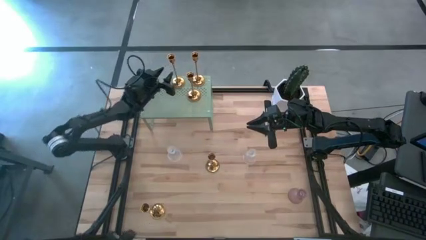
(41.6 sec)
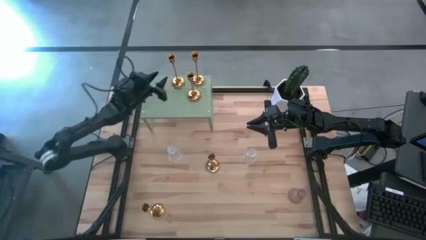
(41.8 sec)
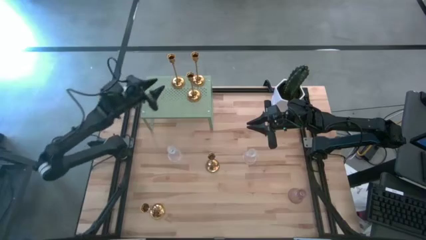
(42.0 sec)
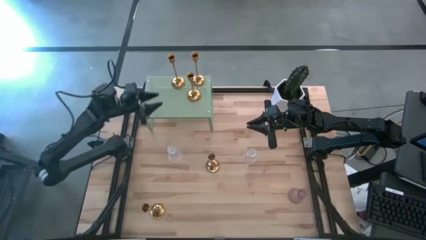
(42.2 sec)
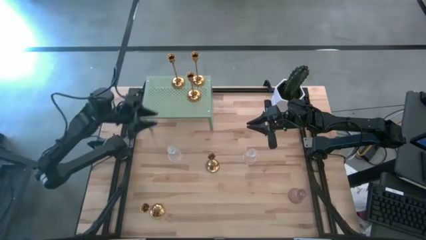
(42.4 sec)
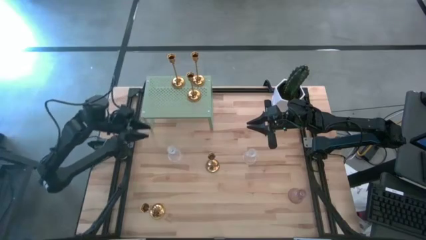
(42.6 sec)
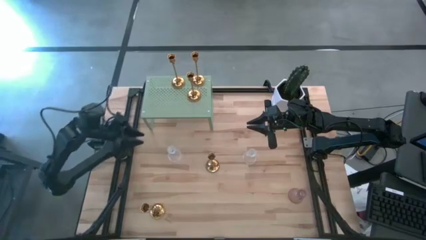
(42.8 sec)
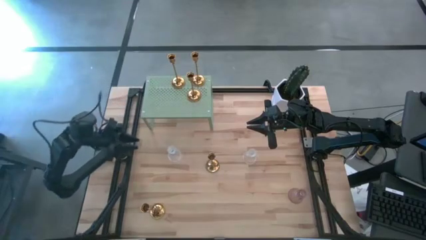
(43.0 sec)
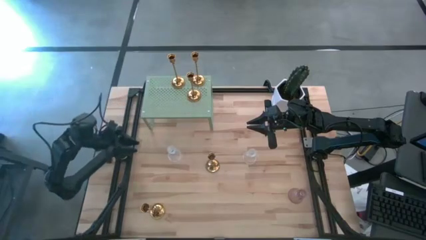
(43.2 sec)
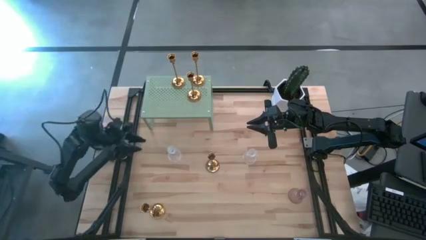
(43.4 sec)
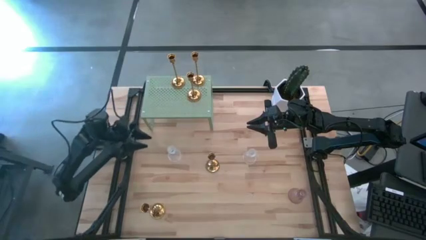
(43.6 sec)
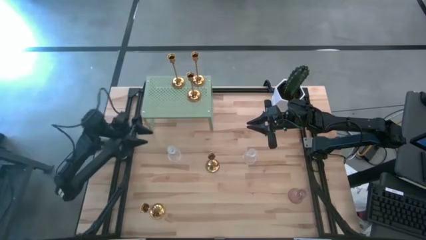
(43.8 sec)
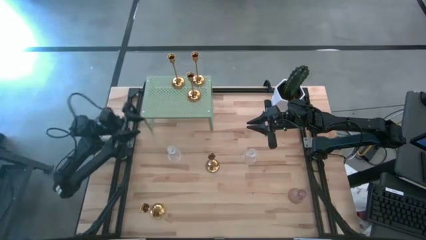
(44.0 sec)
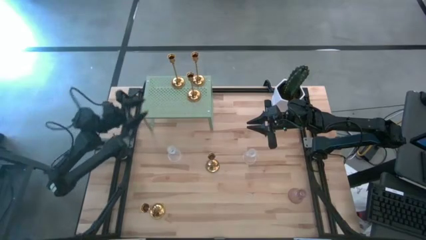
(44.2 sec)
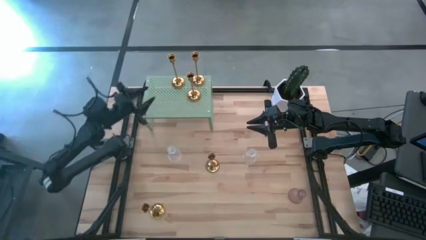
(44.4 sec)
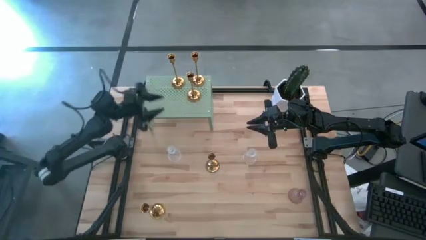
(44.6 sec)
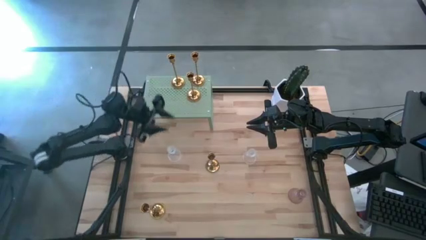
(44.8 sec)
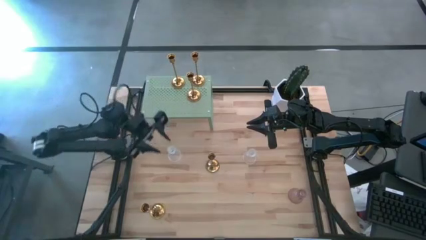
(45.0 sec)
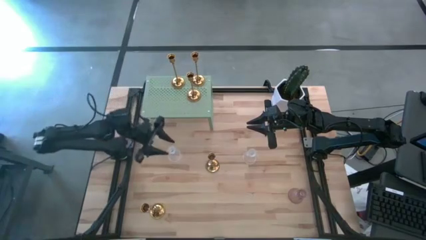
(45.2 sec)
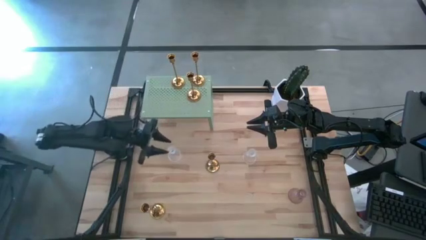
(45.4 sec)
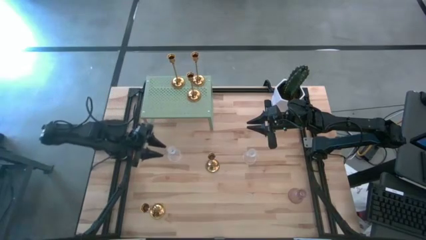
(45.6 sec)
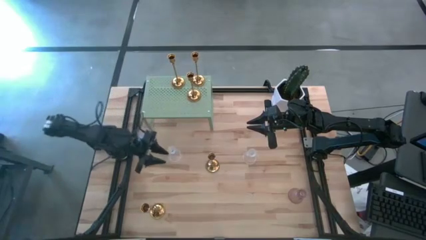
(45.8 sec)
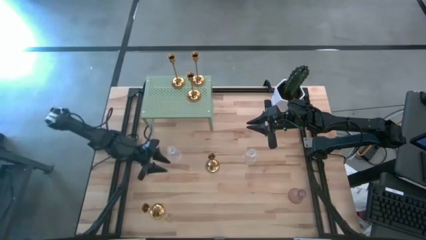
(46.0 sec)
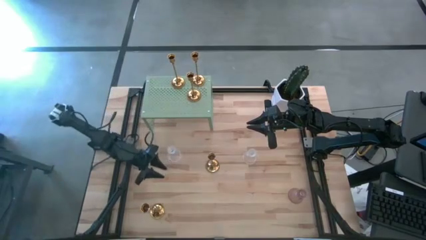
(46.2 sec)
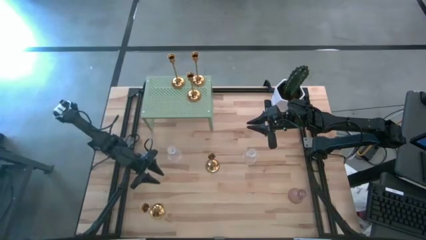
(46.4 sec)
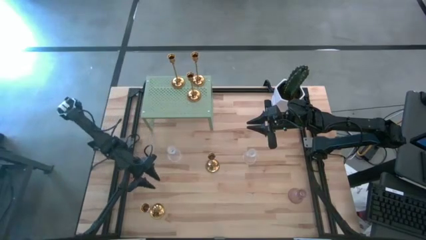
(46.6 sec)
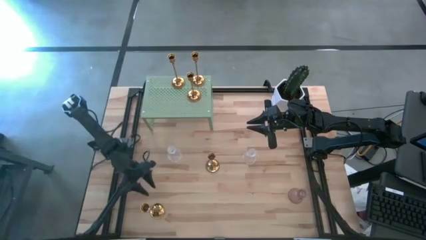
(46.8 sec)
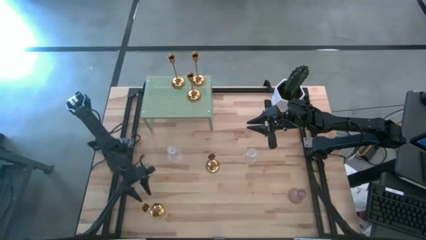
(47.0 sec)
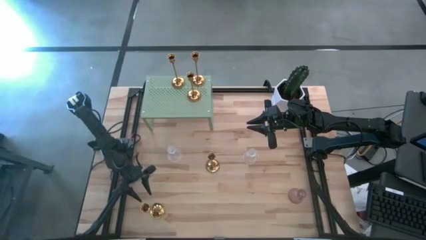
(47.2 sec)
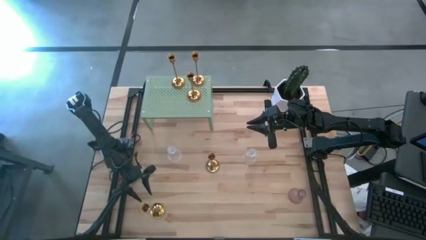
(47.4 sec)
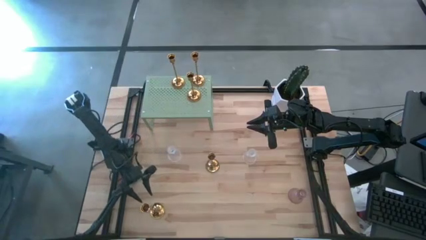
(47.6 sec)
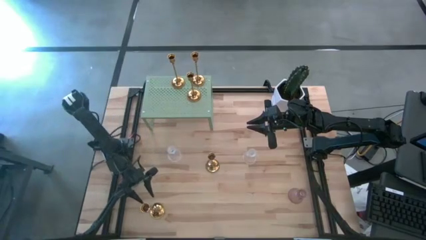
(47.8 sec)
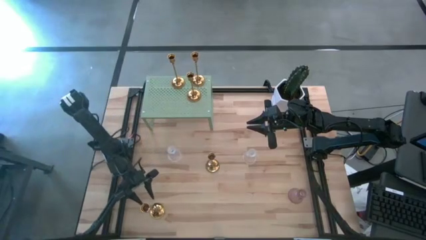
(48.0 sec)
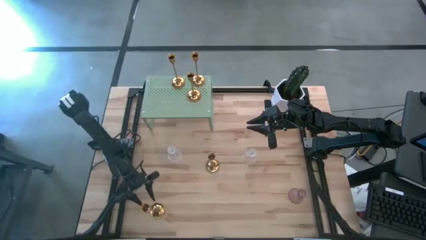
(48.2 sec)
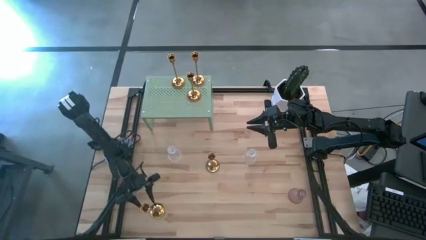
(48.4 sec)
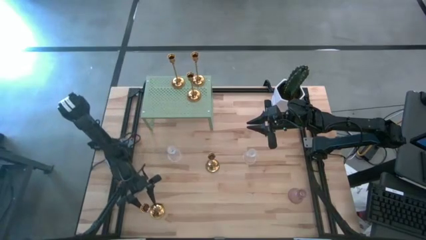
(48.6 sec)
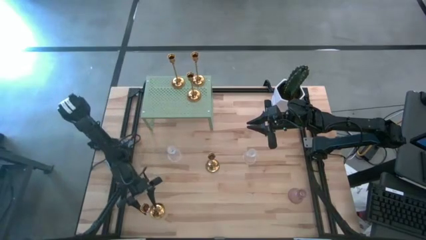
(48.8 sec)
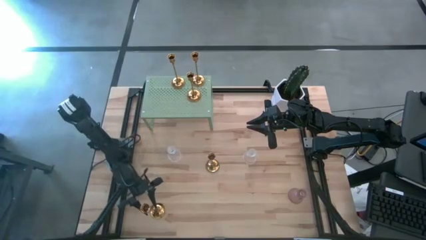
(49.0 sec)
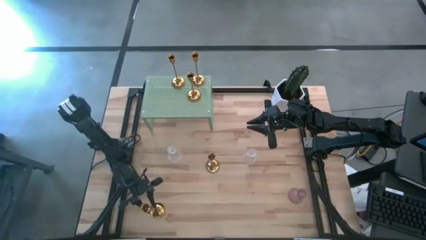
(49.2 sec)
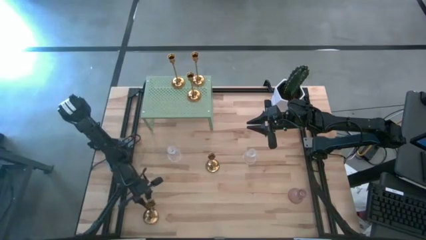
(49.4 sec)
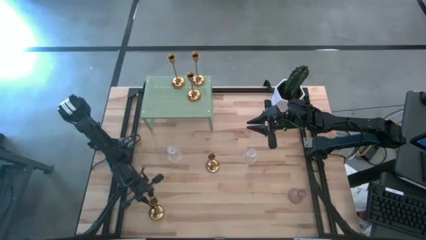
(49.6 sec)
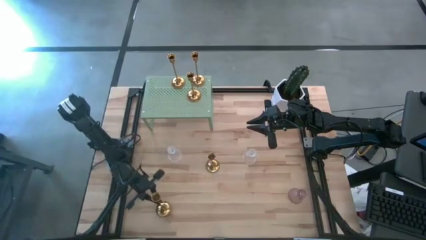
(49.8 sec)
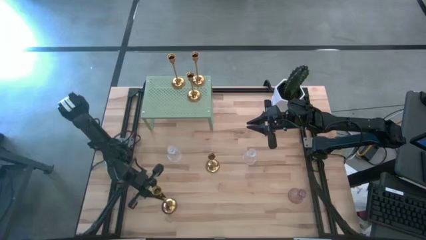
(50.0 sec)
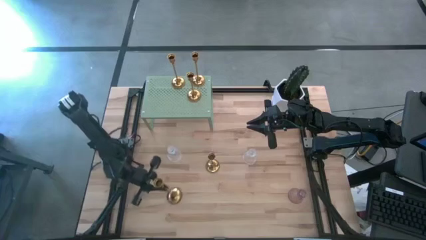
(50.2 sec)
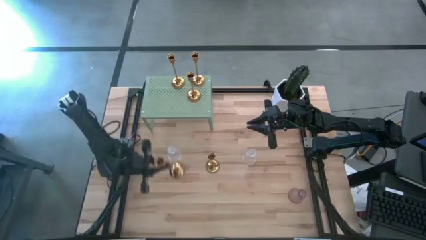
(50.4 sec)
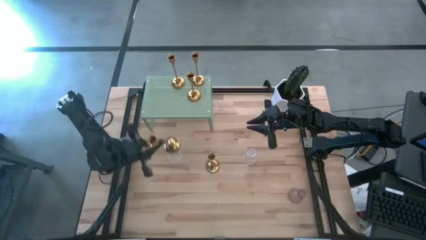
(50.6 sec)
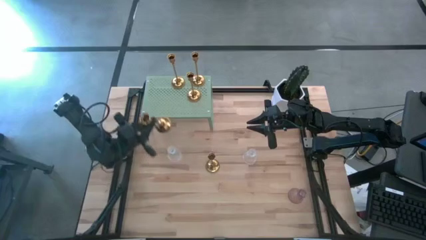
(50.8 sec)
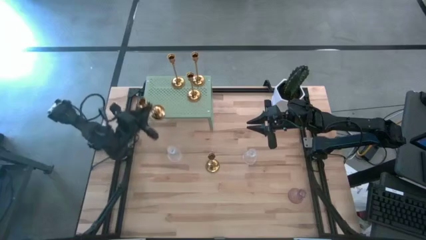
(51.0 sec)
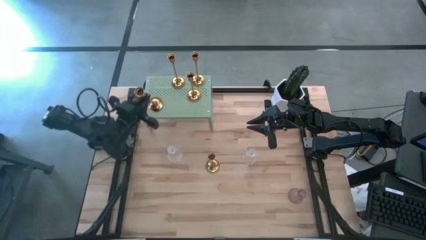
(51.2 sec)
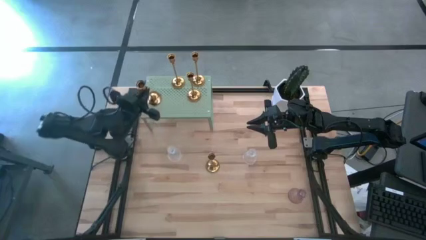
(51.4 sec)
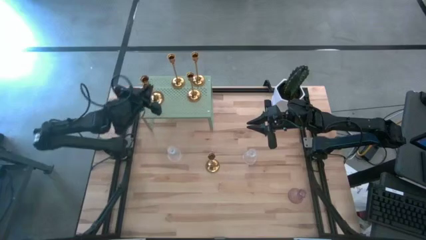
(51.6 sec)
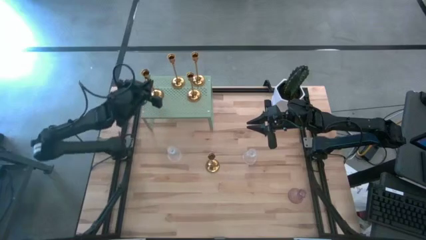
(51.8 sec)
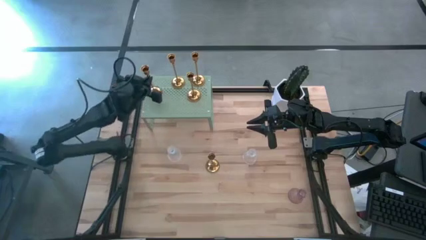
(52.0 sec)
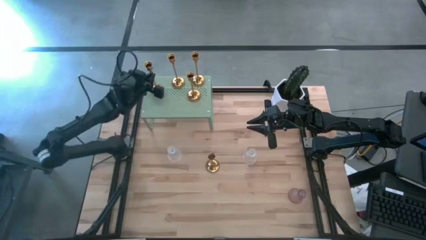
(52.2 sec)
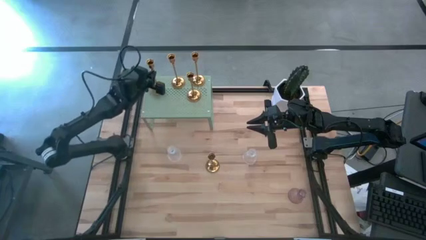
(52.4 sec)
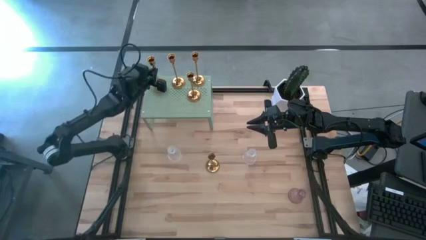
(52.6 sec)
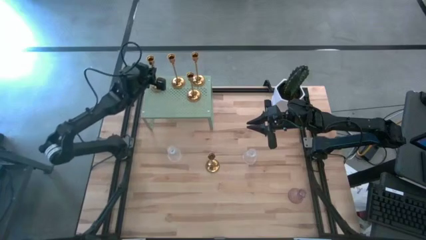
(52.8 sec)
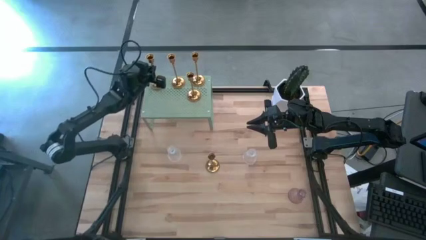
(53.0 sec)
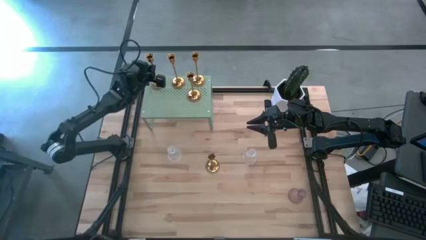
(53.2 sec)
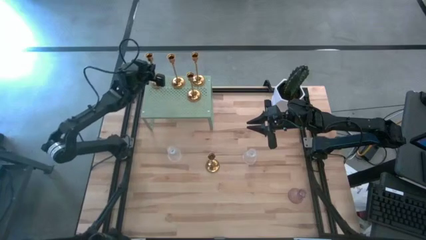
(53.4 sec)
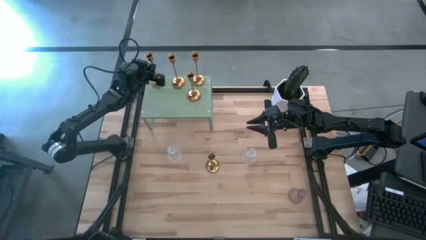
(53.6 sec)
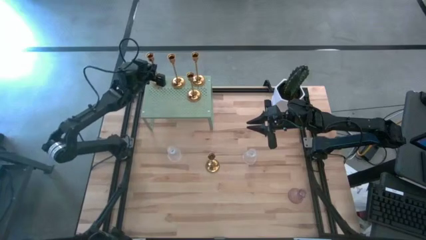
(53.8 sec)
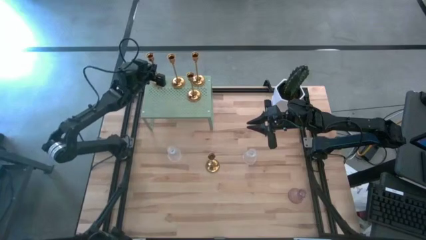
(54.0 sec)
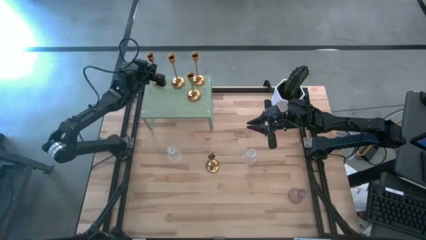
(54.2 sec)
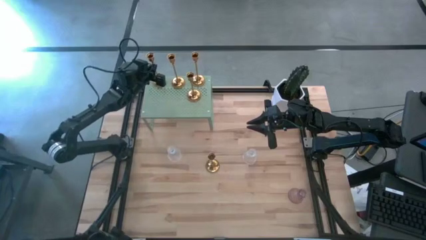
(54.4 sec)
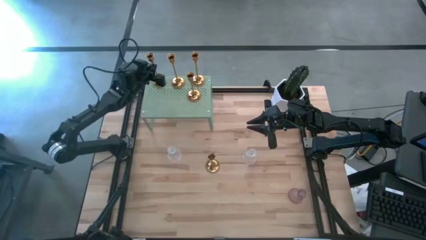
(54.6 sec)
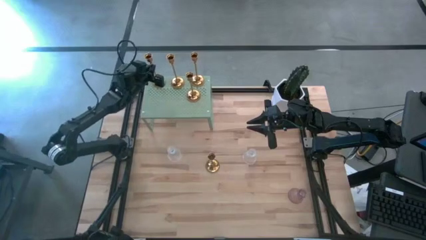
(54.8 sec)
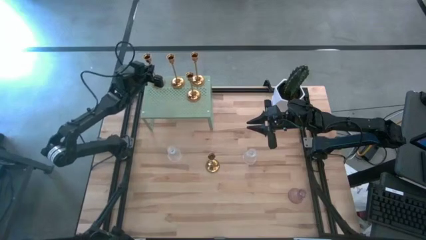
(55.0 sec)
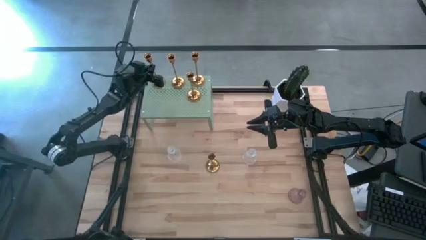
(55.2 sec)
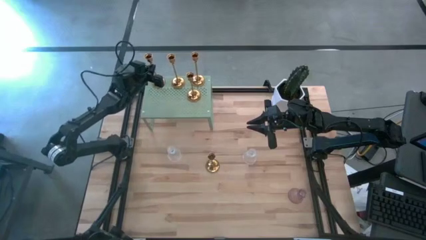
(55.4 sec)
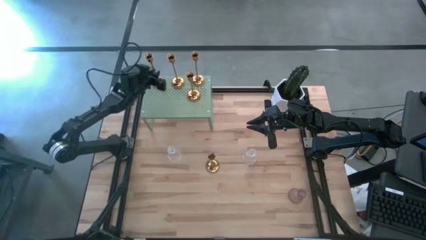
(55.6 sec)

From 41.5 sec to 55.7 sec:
Task: Pick & Place candle stick holders
Put the bottom candle holder on the shelf
